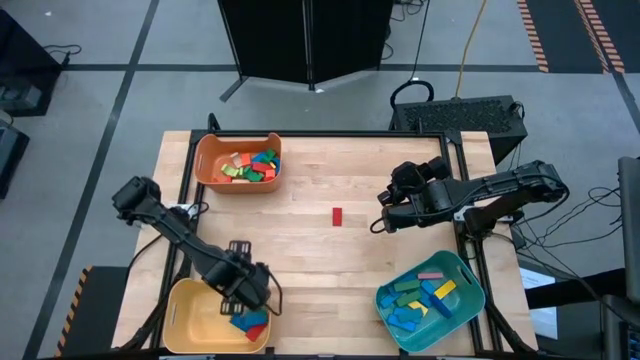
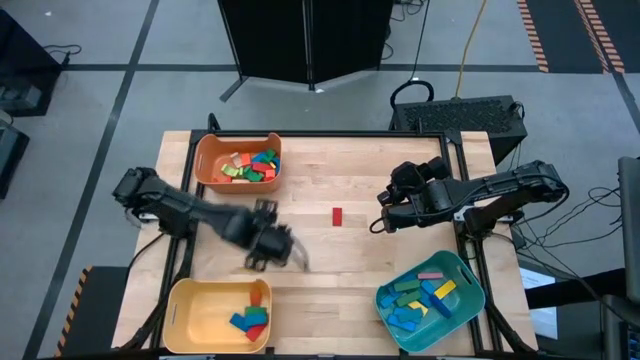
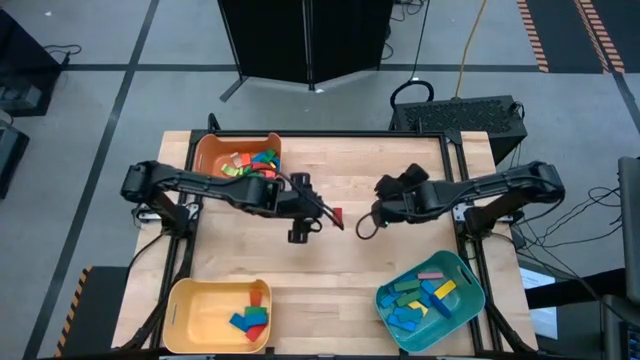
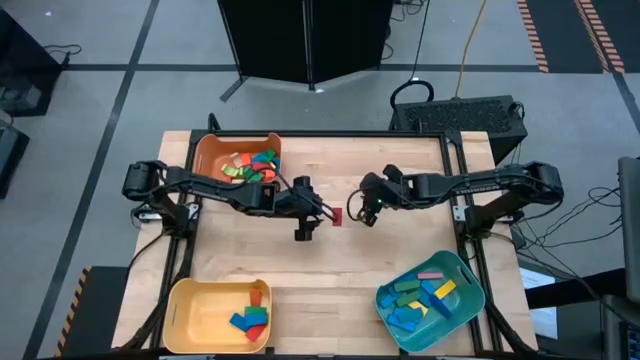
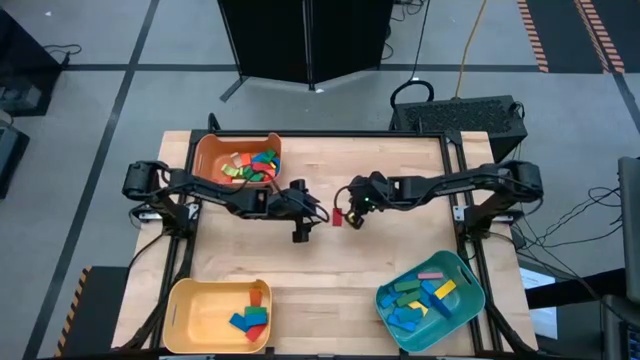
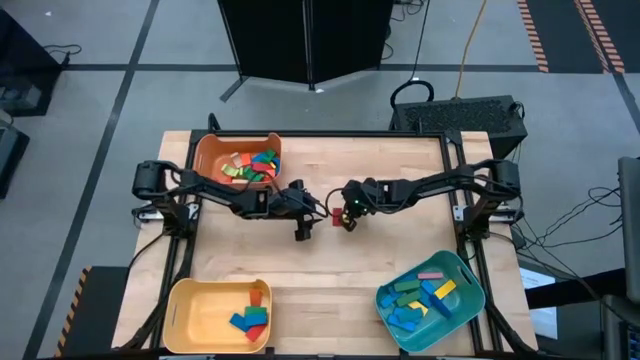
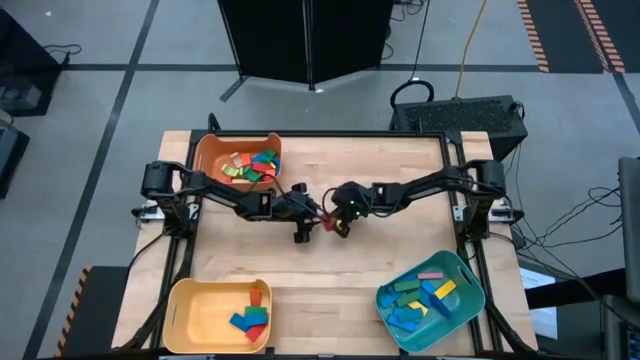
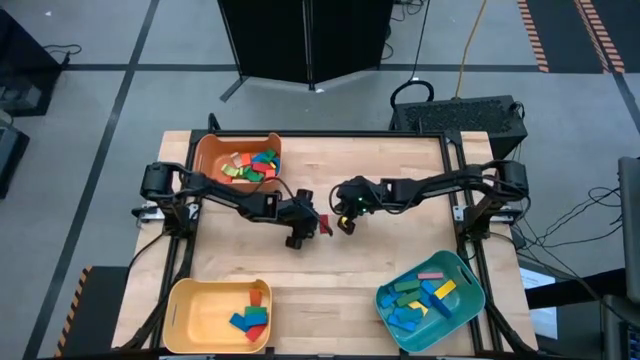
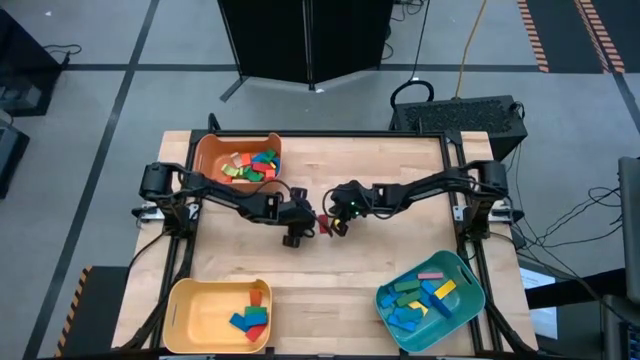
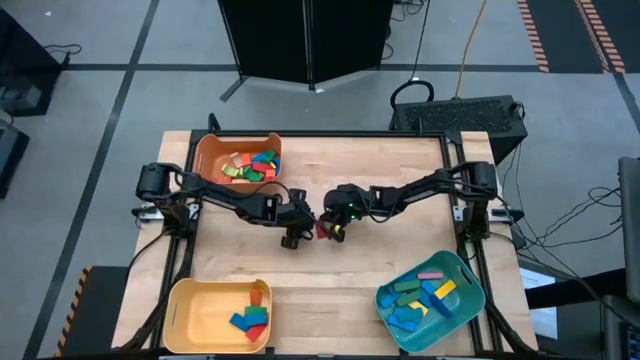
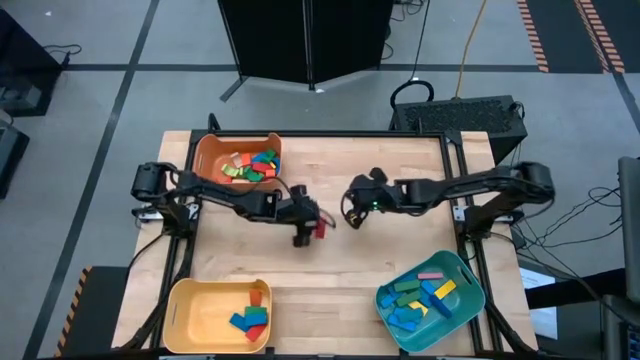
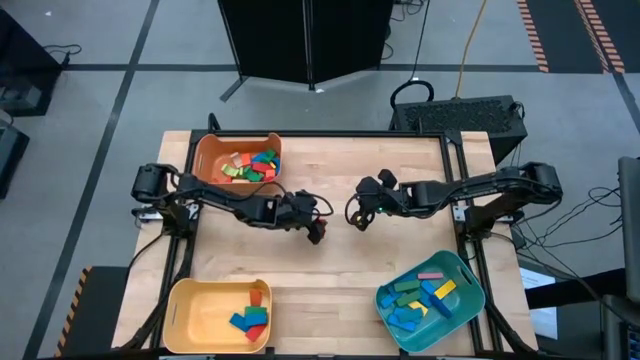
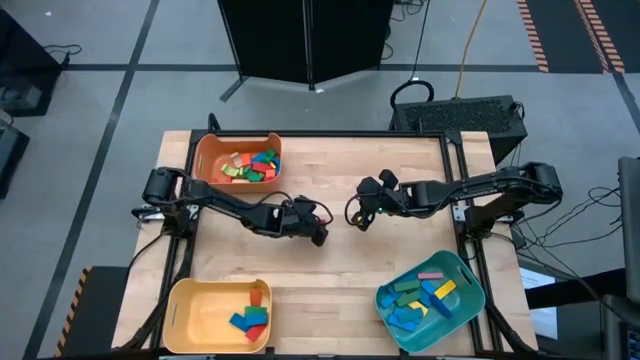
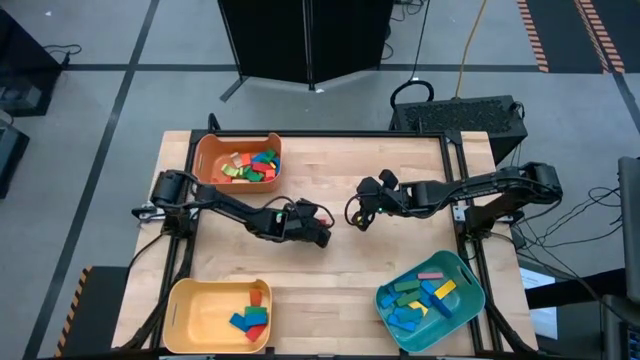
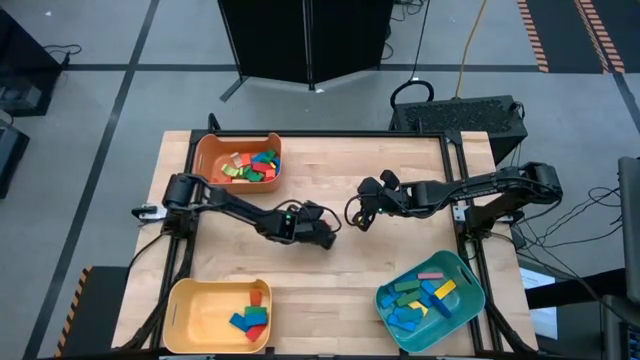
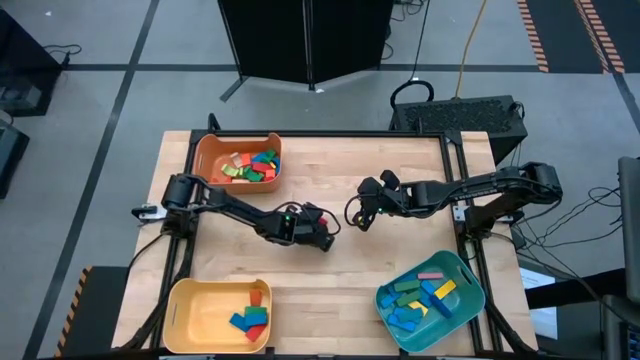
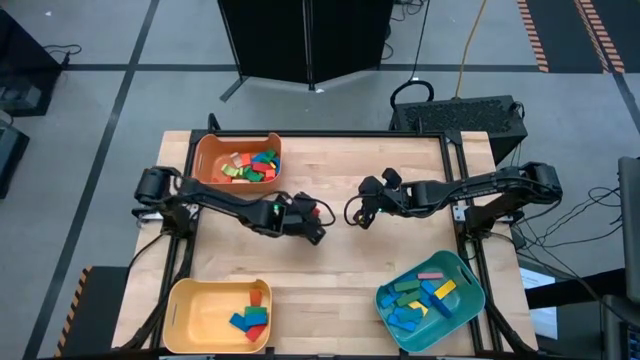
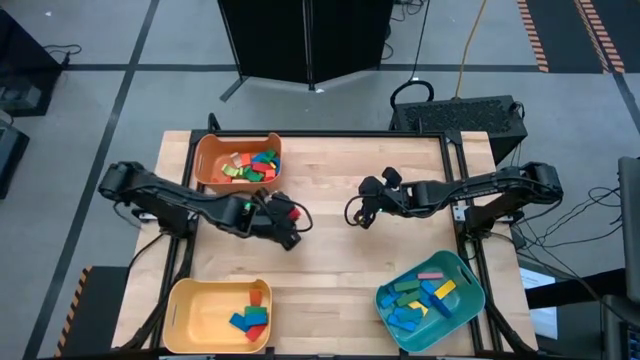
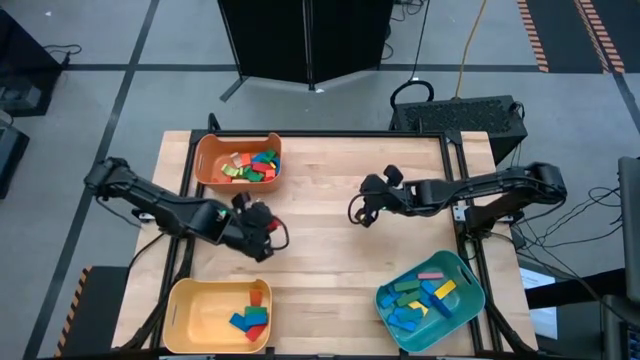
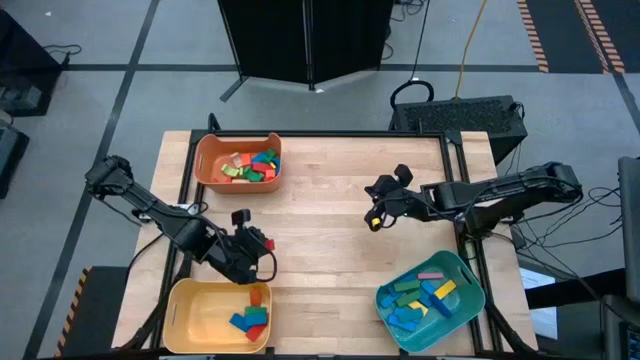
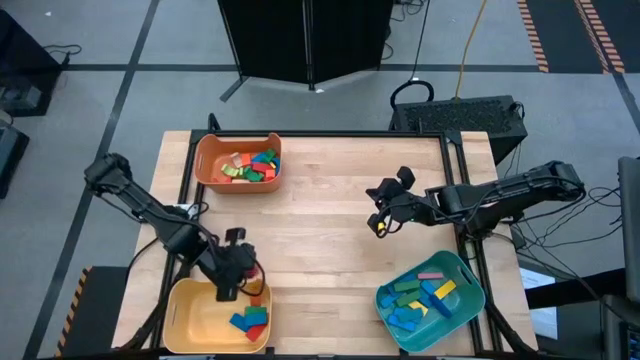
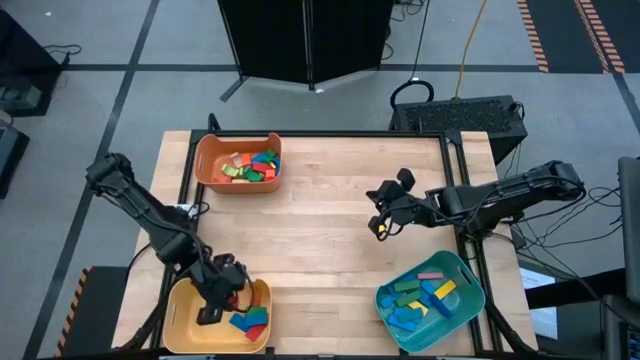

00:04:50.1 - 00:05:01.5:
Task: Sort blocks by size
Put the red triangular block into the yellow bin

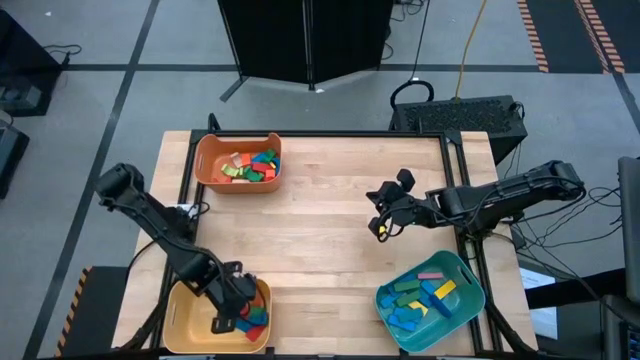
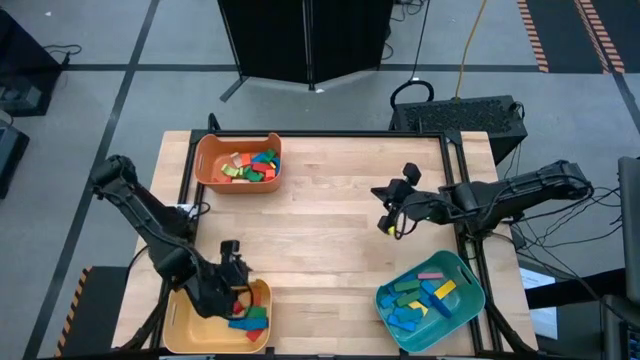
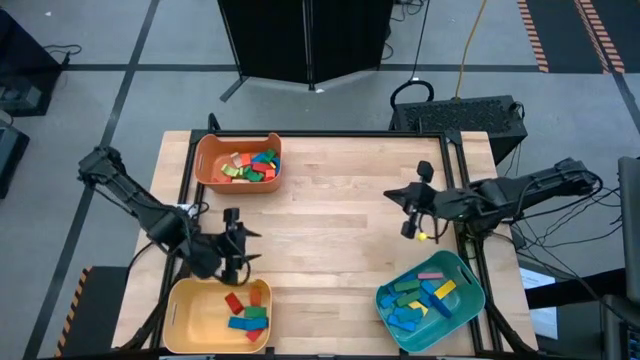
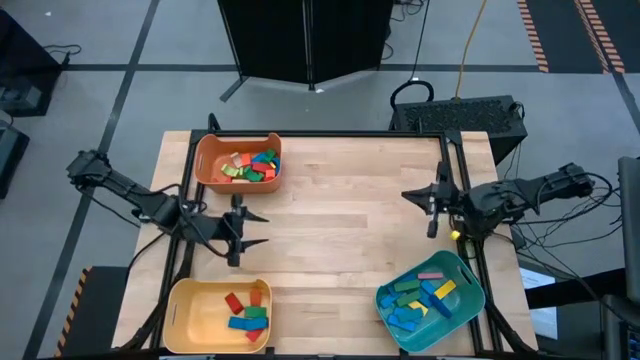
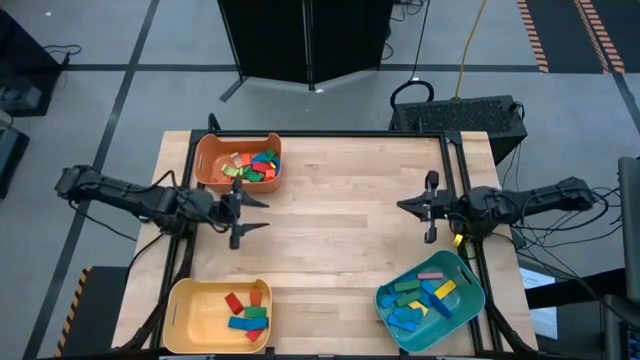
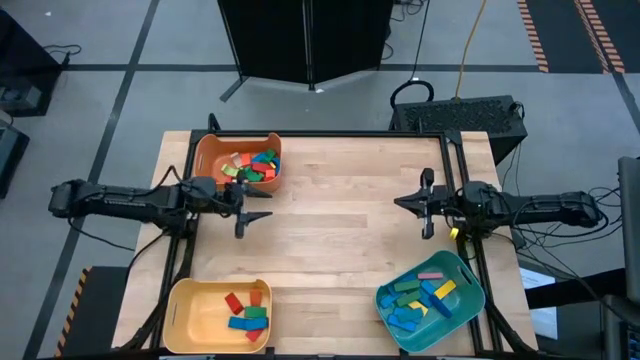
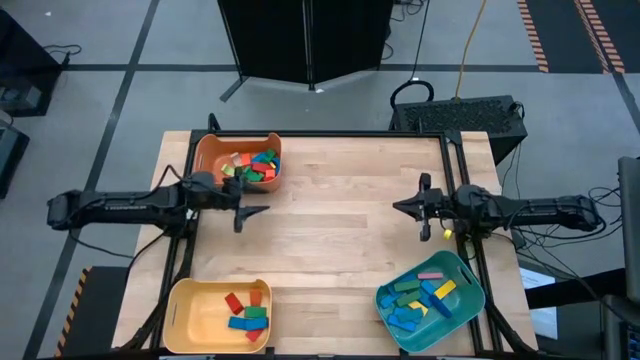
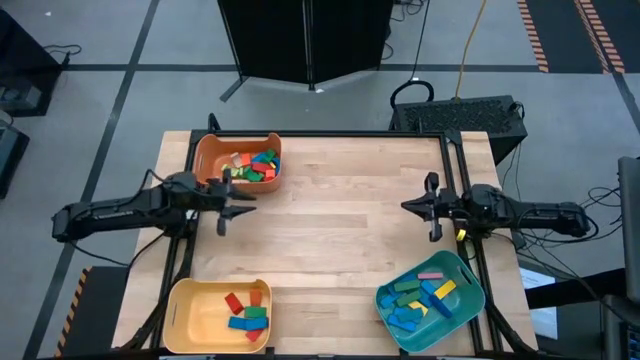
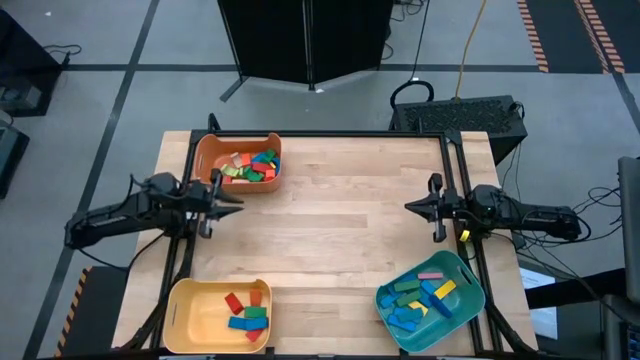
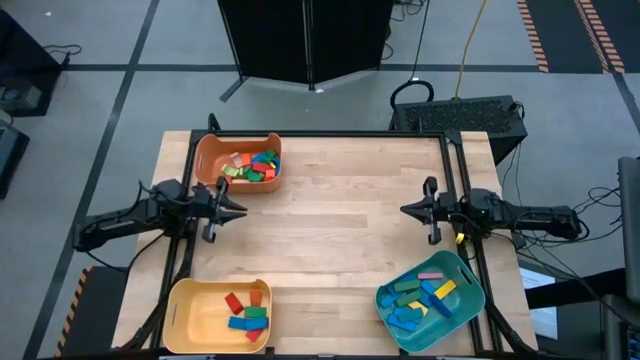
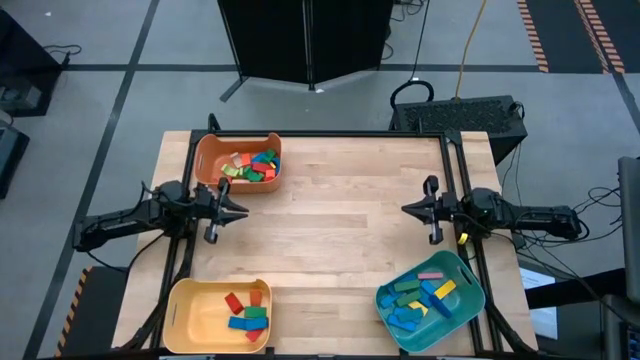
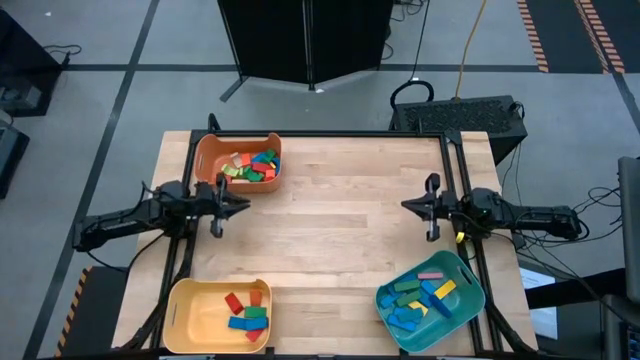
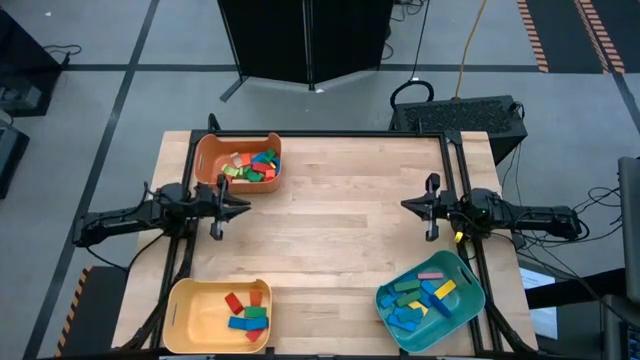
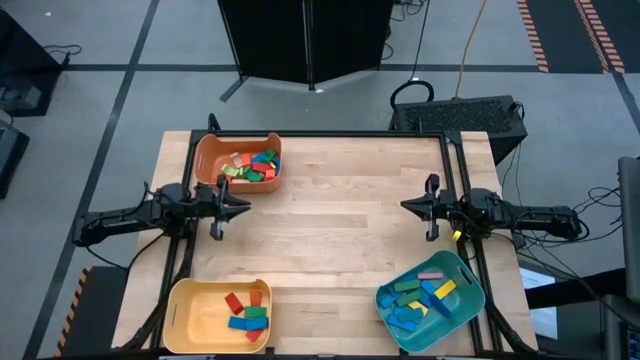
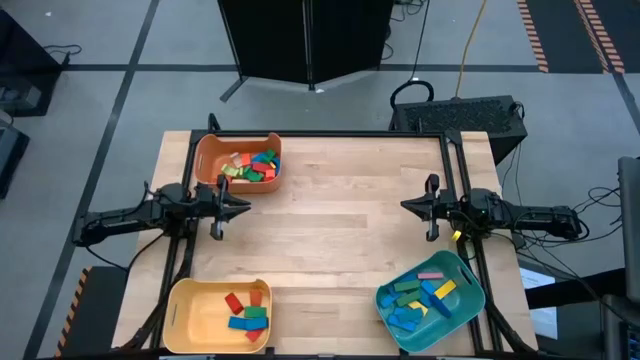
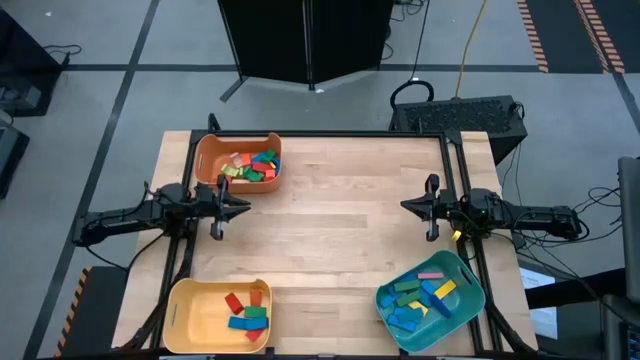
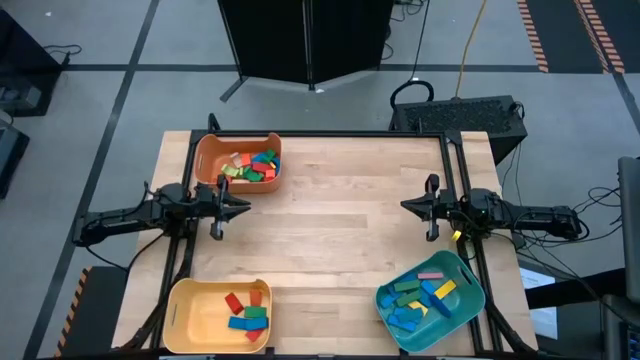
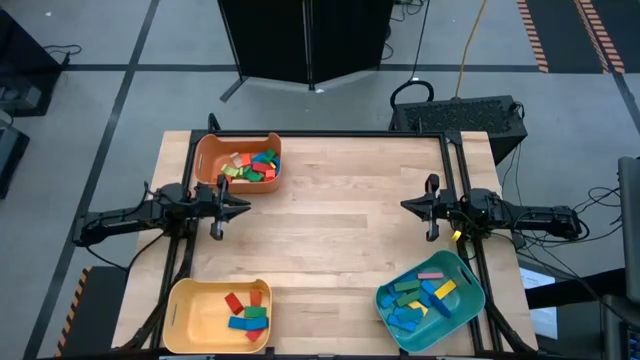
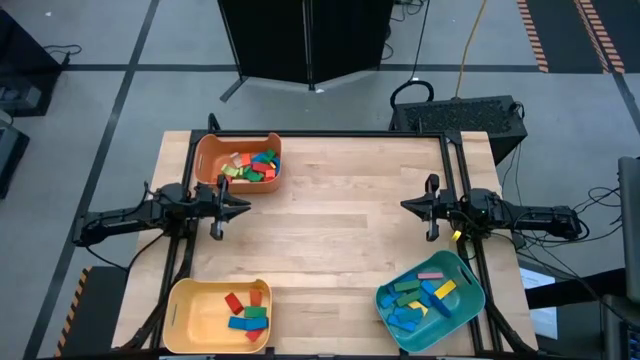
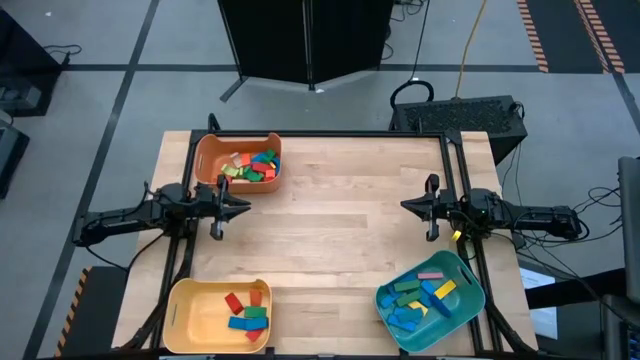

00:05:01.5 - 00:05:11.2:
Return to Home Position
